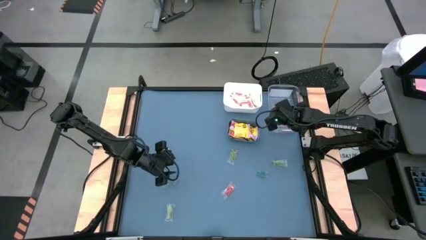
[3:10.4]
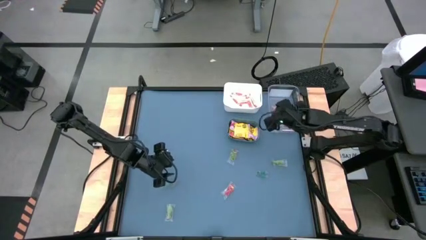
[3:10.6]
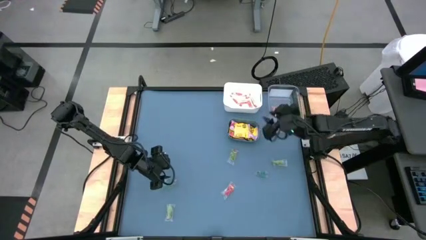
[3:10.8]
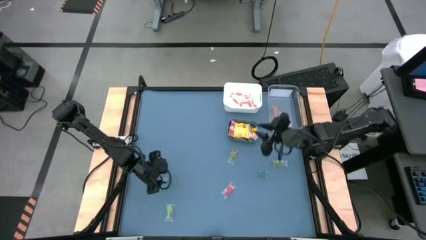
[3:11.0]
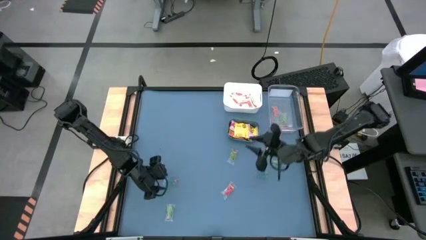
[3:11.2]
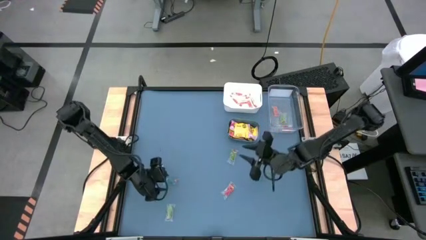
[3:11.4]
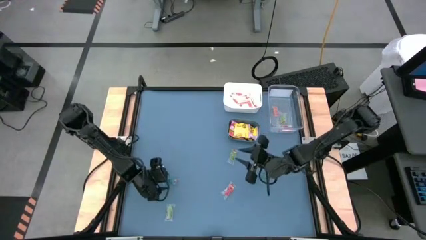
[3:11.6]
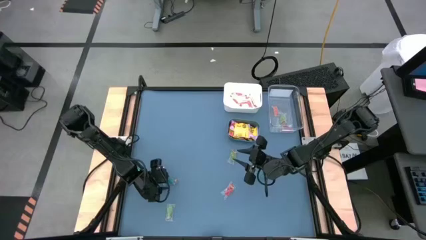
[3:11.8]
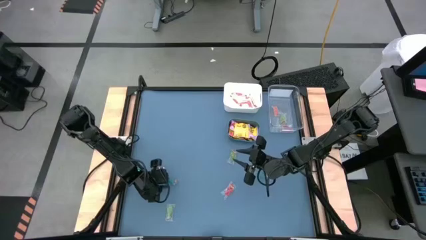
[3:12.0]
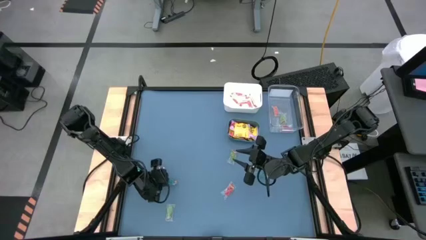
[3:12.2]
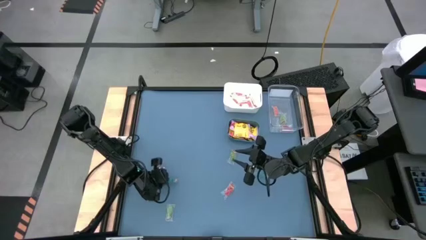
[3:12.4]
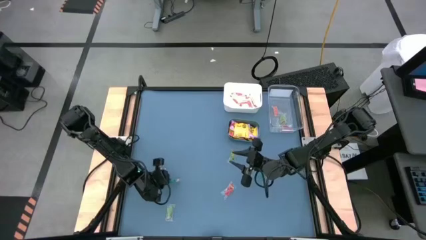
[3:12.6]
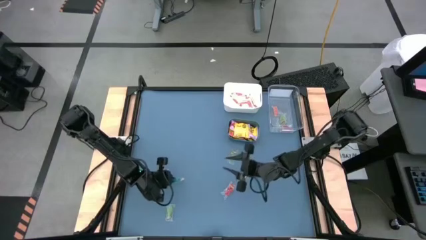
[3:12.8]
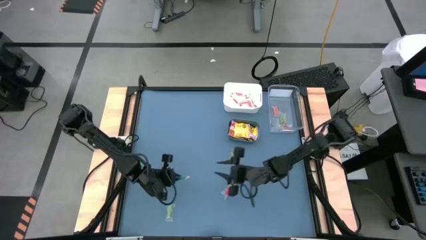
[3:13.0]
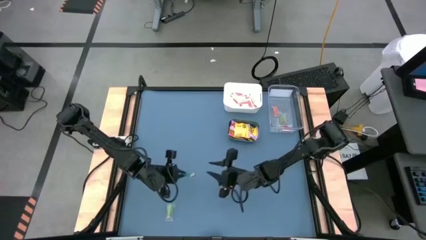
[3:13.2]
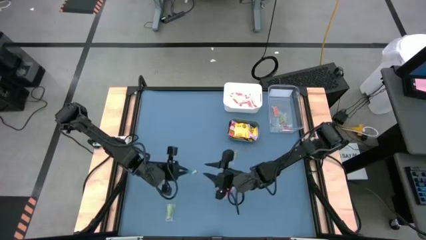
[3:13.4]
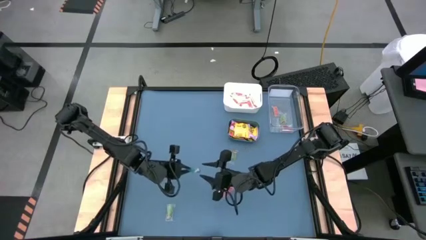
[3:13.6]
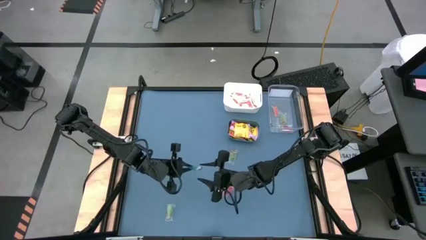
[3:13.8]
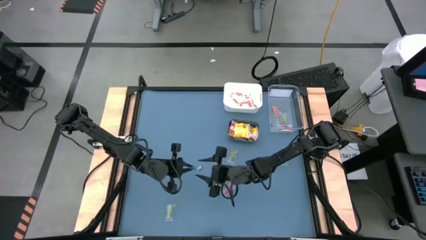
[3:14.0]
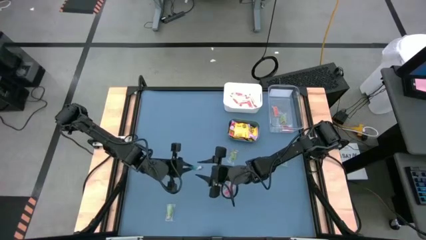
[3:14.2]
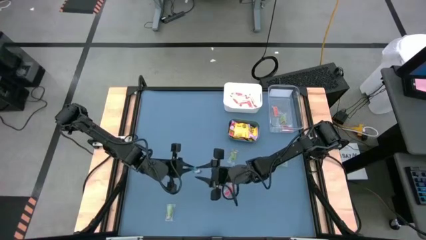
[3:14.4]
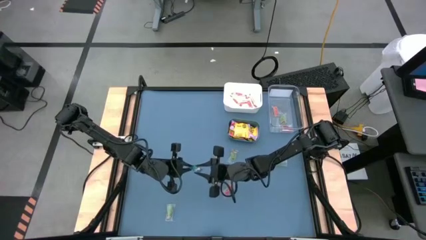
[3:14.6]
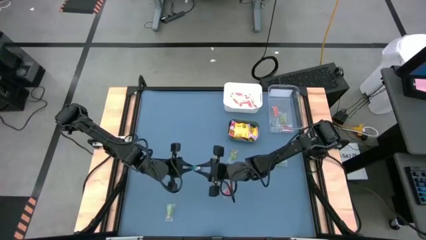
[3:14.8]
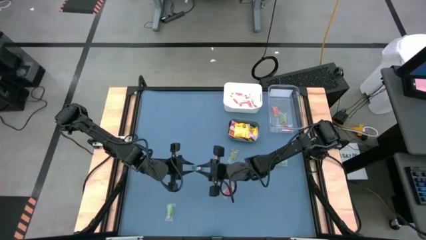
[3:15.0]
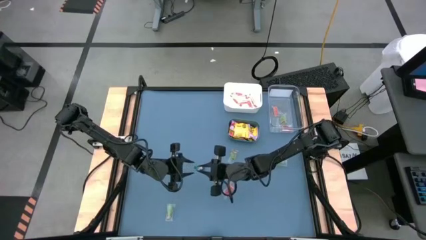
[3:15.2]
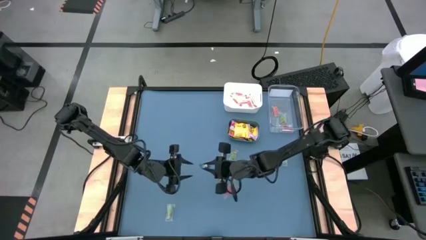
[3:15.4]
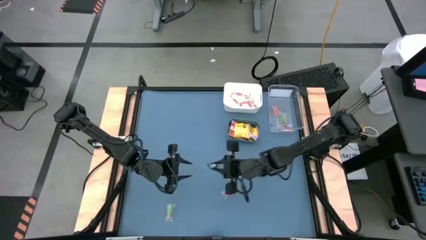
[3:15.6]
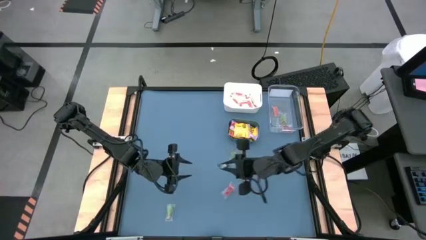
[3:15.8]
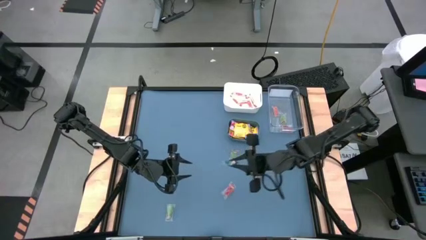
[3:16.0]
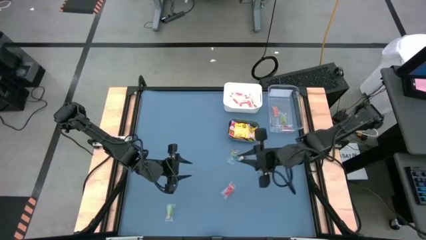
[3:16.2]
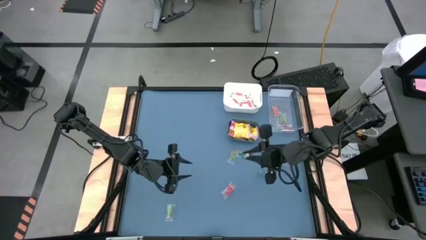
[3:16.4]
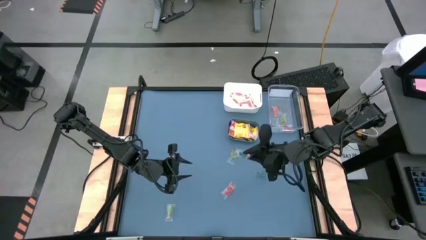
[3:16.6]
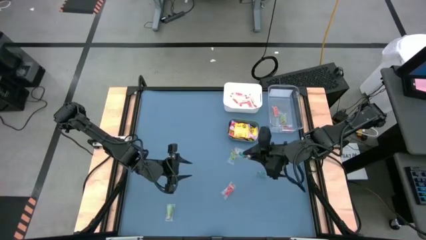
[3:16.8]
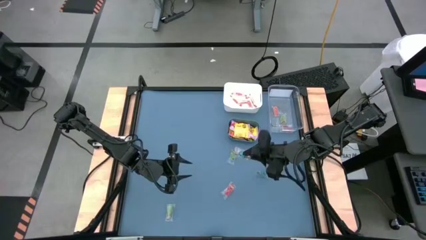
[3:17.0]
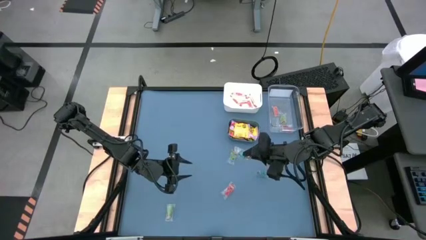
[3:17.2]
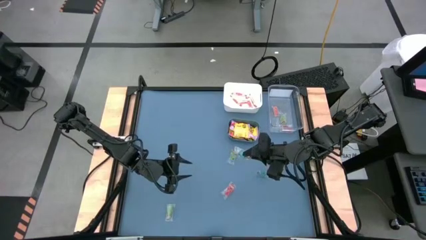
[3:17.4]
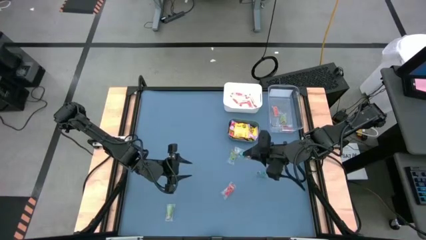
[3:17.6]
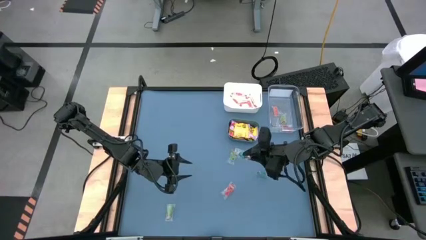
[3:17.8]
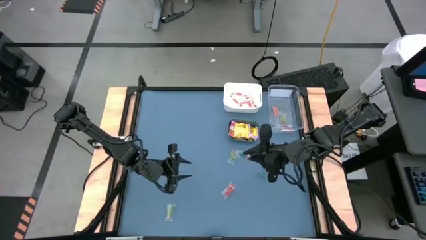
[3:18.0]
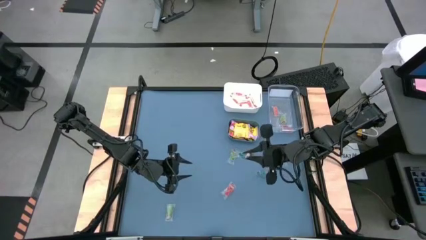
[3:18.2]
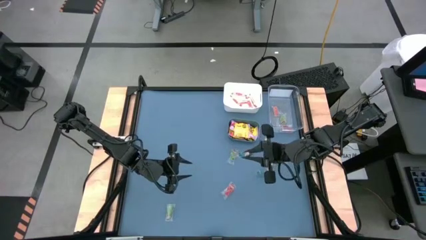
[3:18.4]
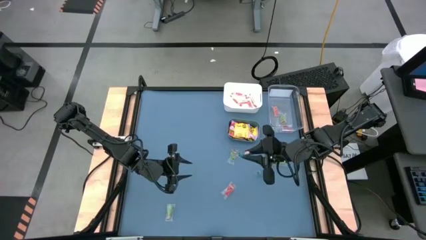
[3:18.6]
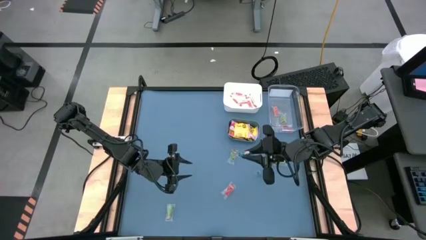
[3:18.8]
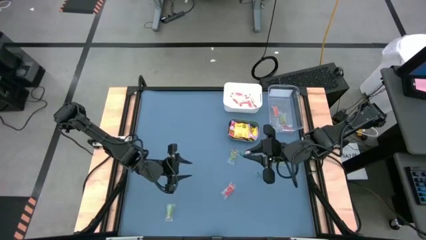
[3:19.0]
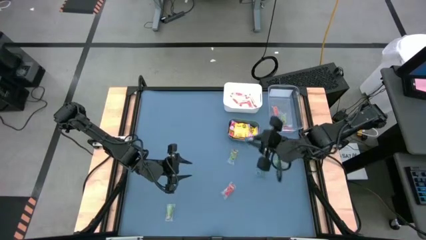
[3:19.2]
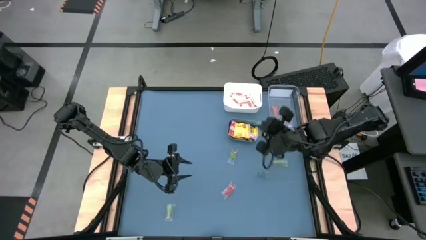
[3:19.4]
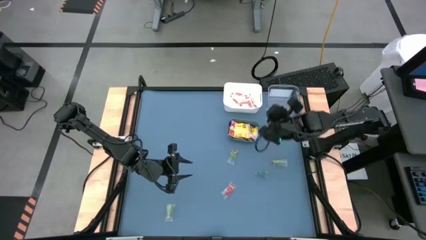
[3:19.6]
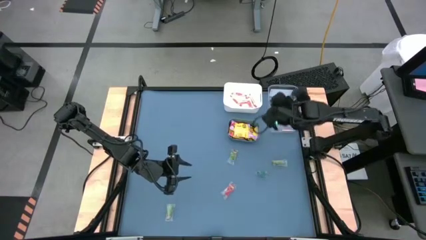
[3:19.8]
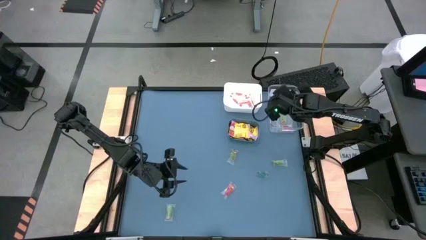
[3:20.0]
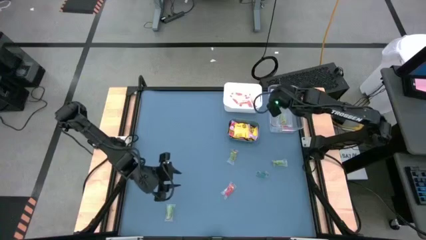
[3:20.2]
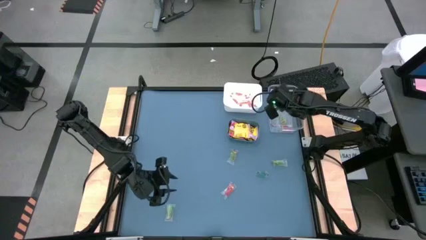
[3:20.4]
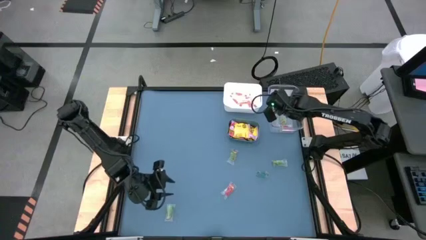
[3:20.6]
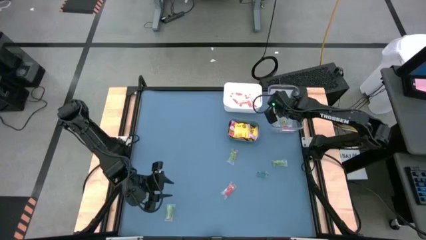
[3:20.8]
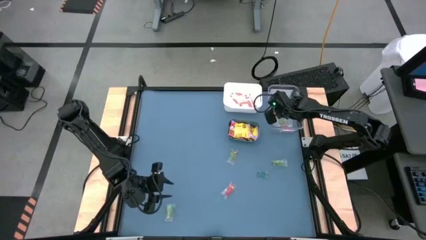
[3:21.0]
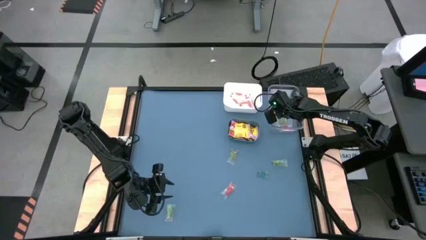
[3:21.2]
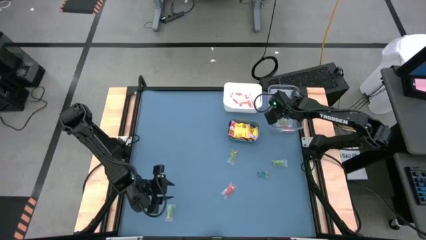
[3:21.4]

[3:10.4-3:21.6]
Task: Sort candy
Put the middle left blue candy into the transparent bin

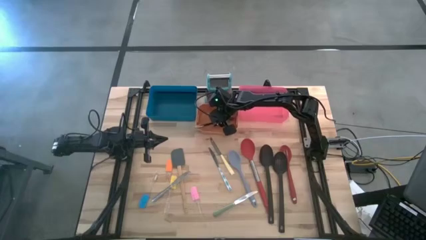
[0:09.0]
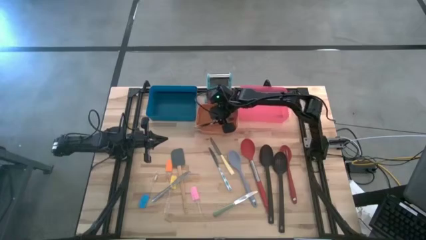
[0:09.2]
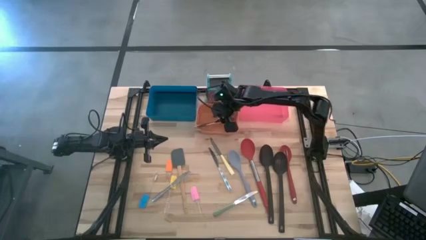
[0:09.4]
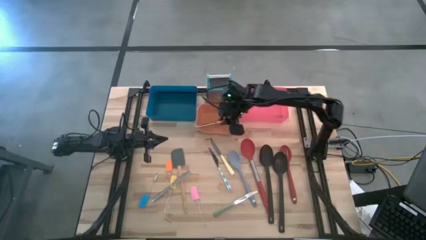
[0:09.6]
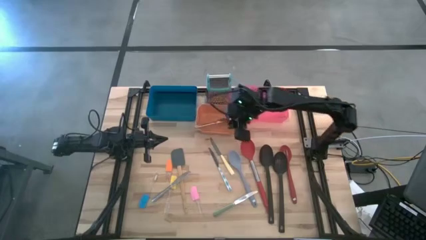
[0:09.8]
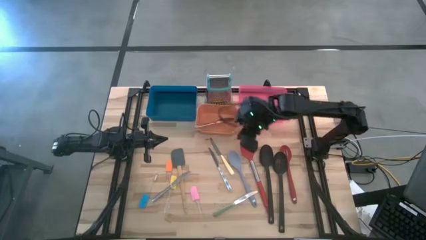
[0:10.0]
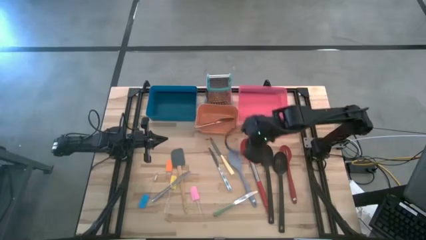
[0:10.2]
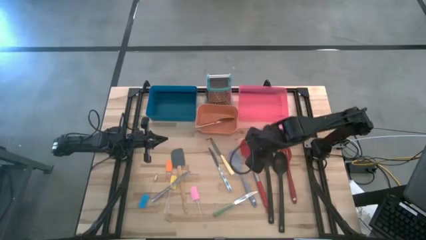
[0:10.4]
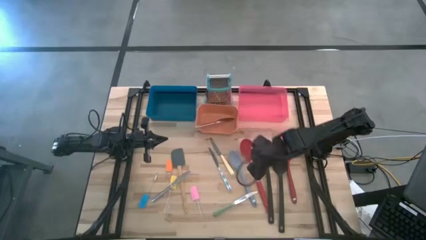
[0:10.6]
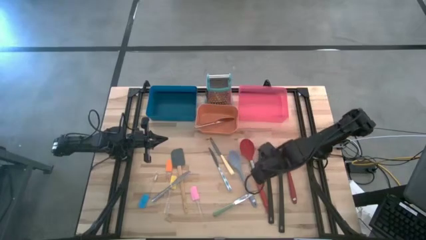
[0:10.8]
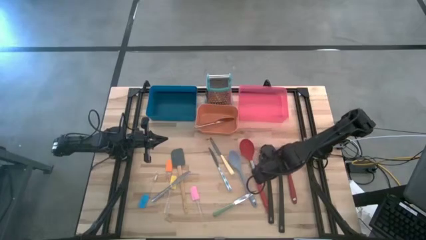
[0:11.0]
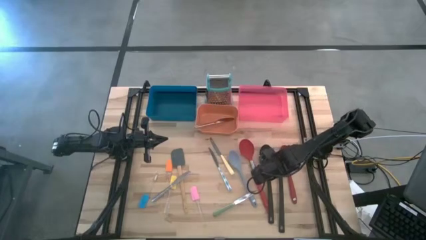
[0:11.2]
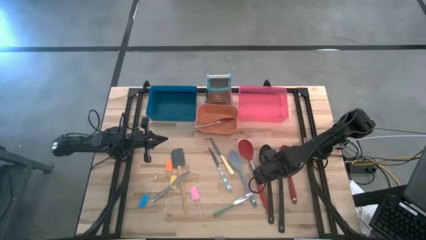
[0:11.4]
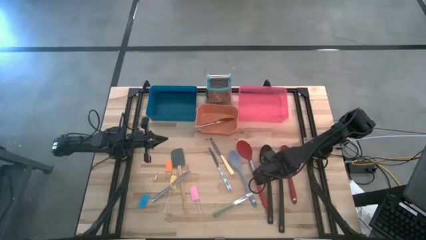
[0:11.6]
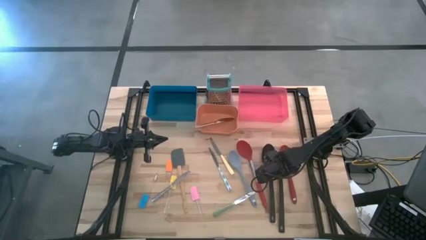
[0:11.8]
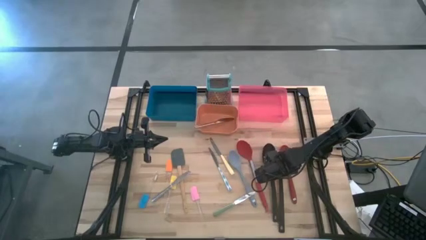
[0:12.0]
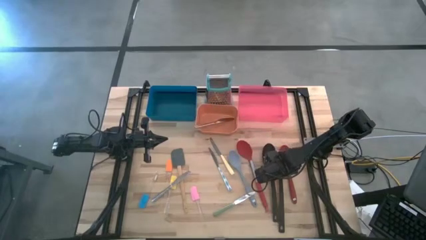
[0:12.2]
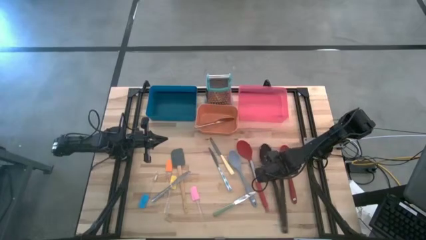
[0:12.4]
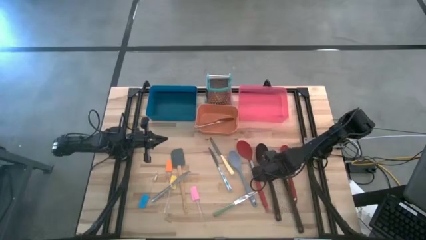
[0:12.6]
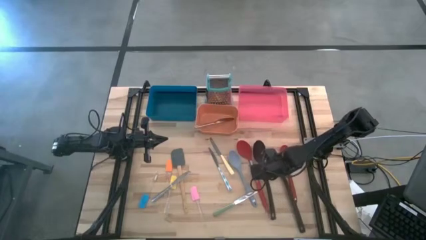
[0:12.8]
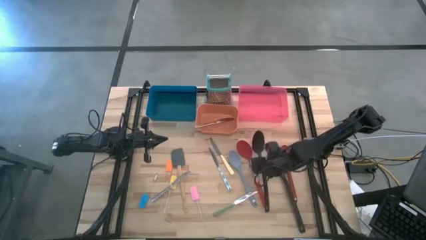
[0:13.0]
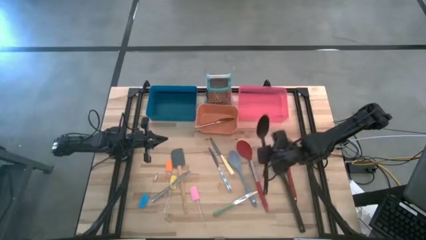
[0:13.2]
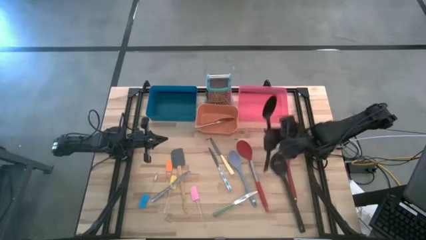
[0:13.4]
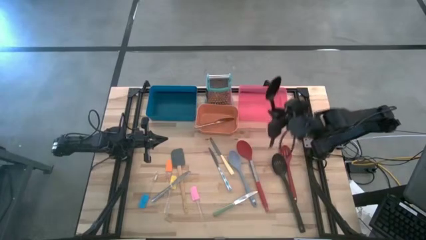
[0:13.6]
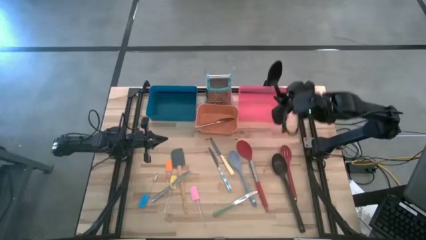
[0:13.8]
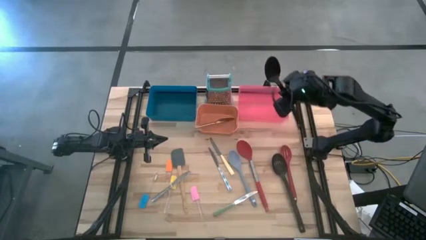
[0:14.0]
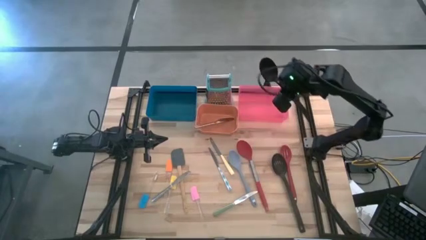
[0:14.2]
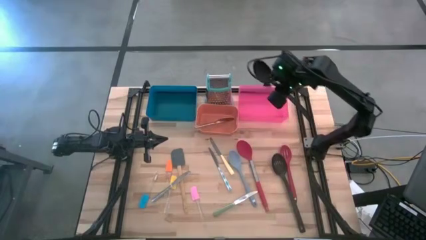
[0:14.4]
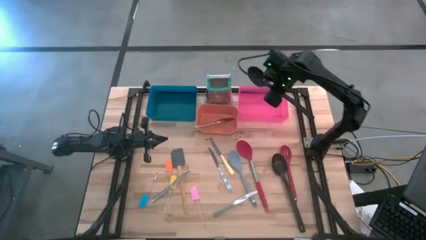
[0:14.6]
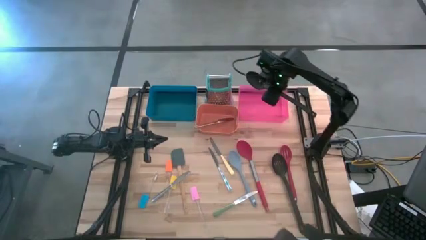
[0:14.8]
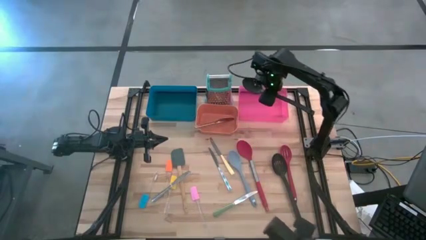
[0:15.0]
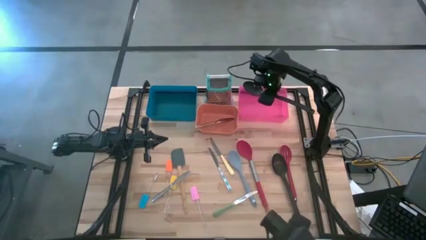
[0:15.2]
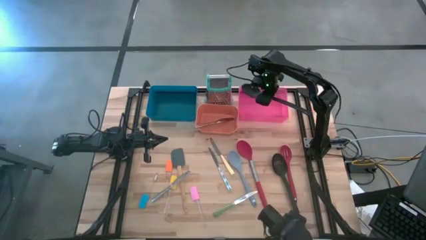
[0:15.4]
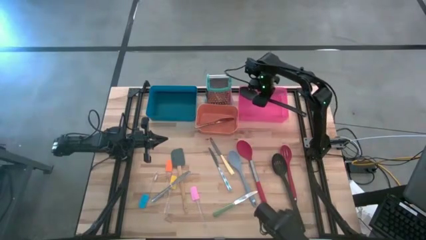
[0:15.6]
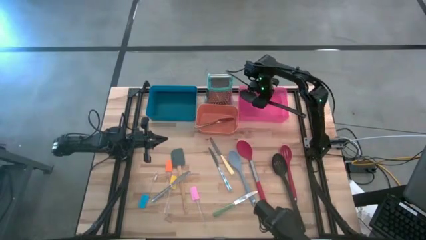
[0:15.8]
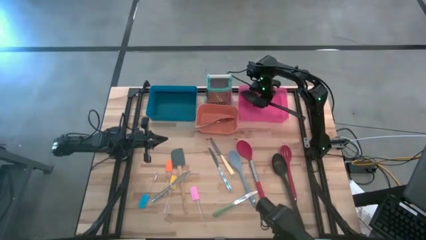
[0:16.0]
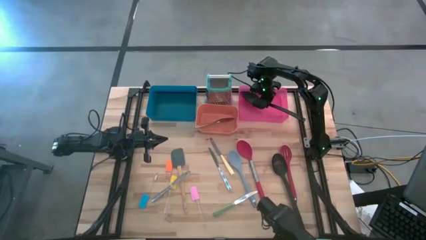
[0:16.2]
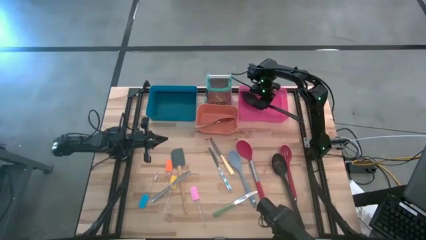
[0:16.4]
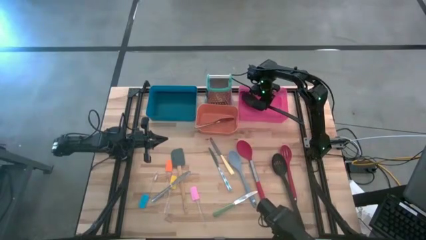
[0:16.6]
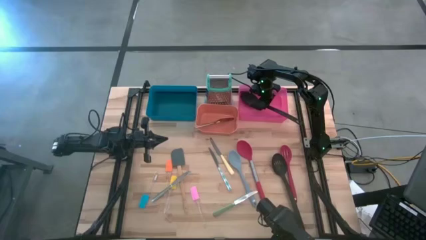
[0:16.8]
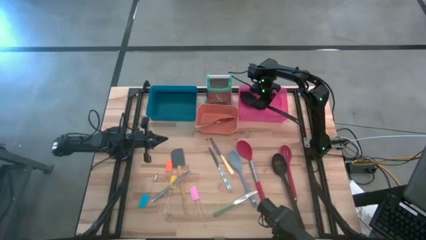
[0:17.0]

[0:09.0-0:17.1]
Task: Pick & Place Kitchen Items
Put the black ladle scoop into the pink bin
